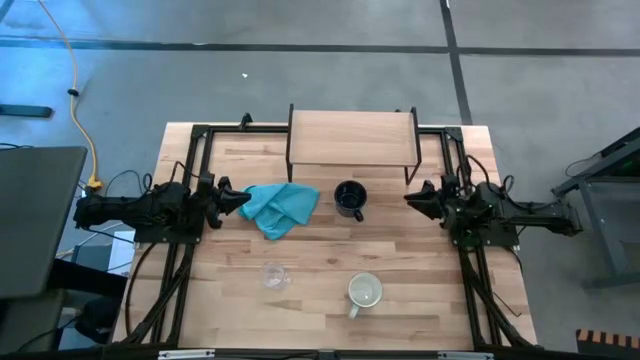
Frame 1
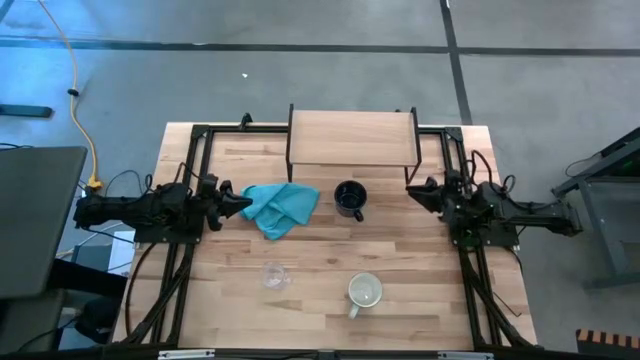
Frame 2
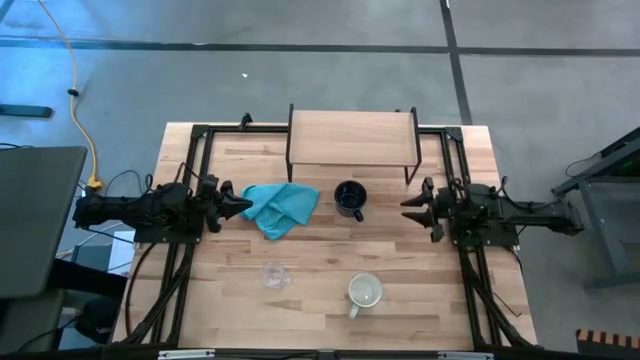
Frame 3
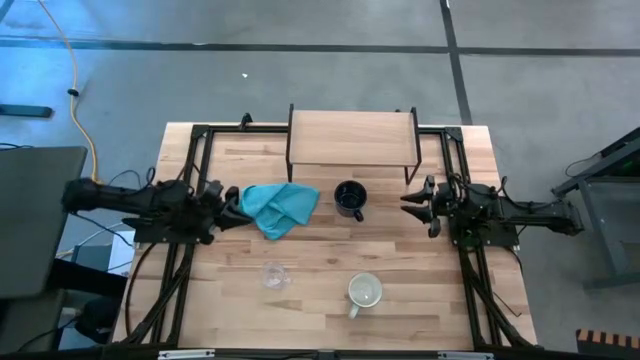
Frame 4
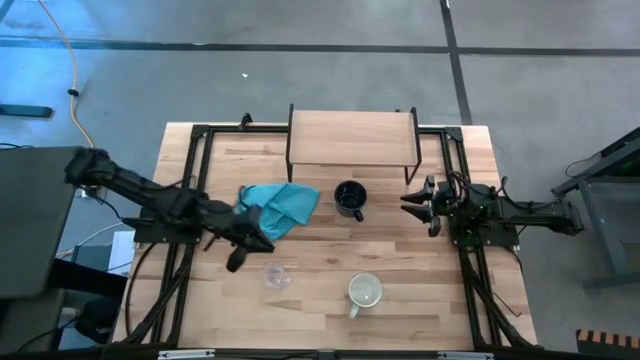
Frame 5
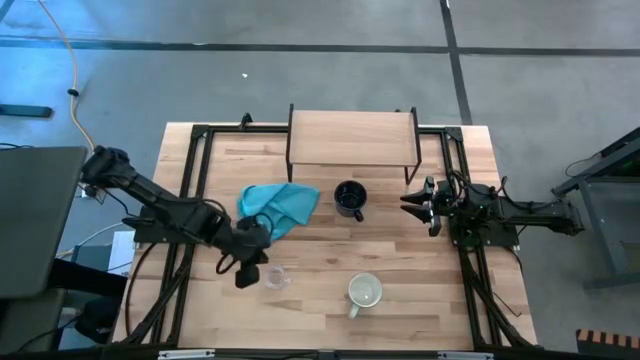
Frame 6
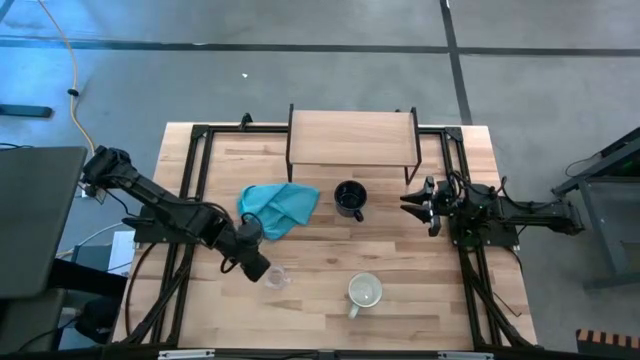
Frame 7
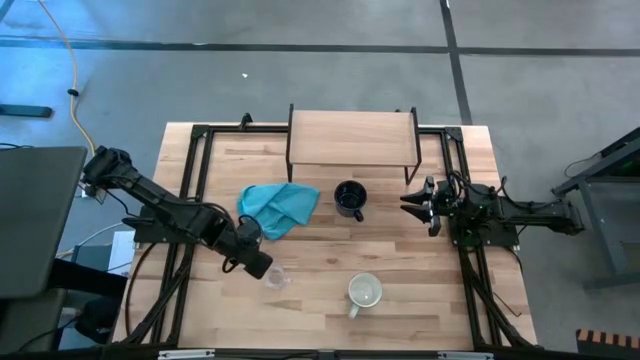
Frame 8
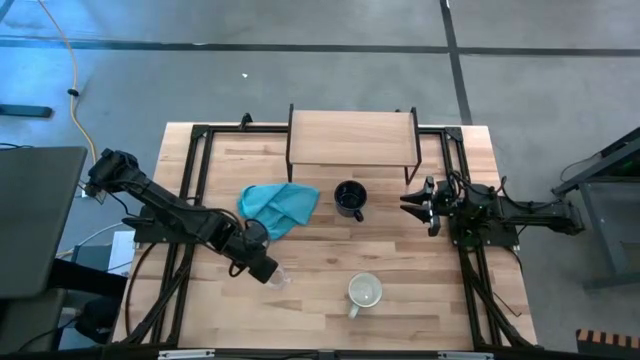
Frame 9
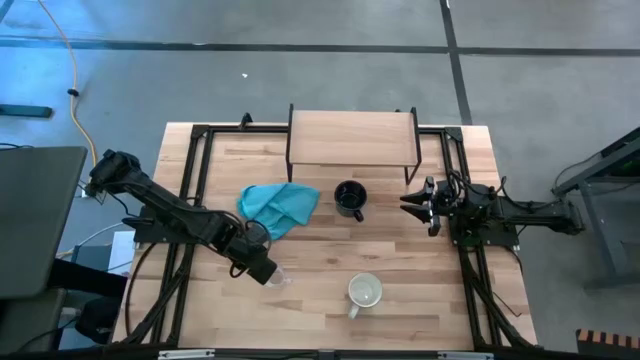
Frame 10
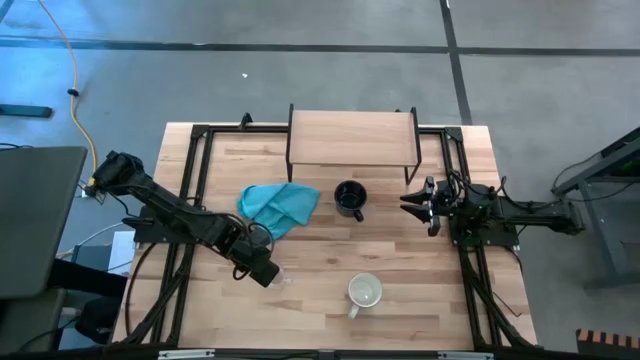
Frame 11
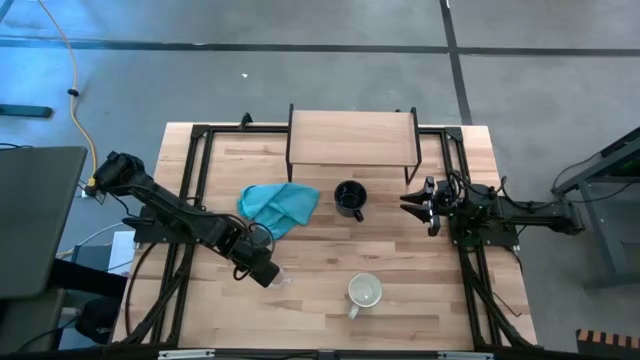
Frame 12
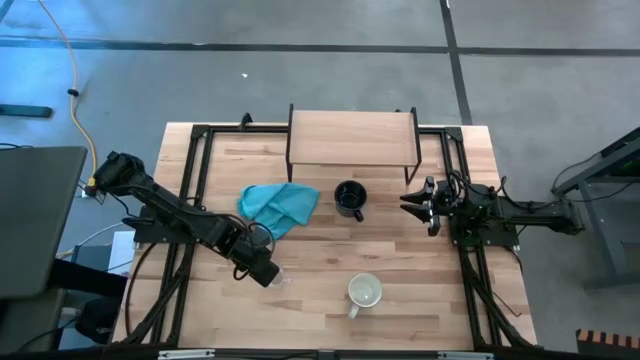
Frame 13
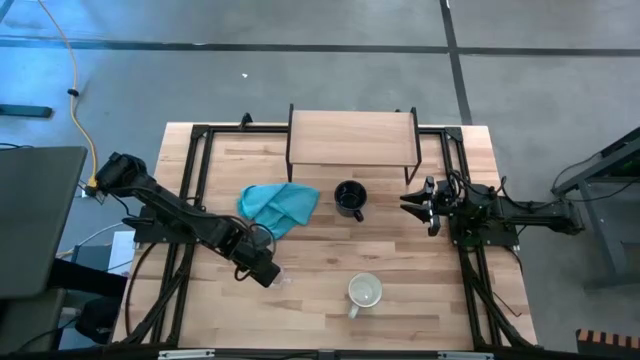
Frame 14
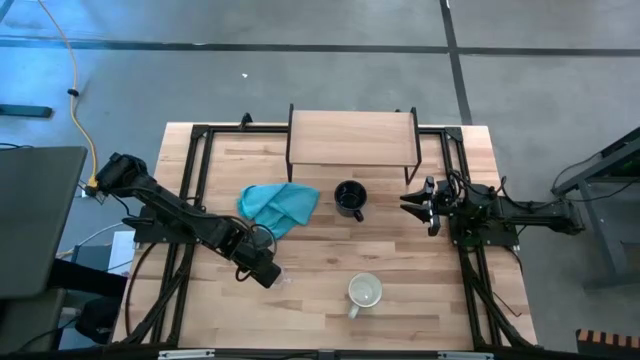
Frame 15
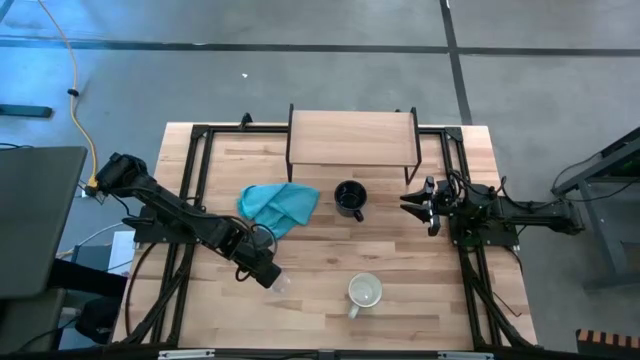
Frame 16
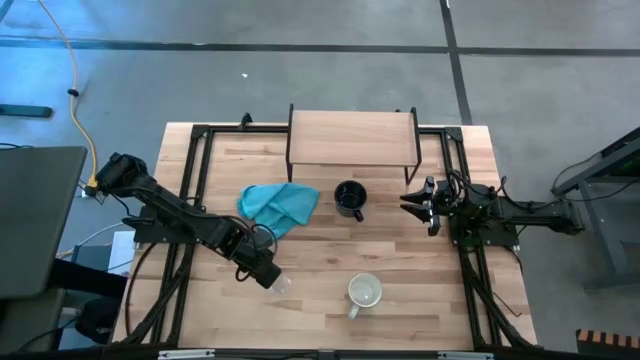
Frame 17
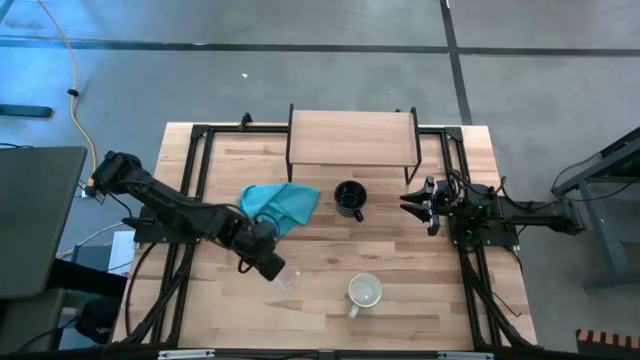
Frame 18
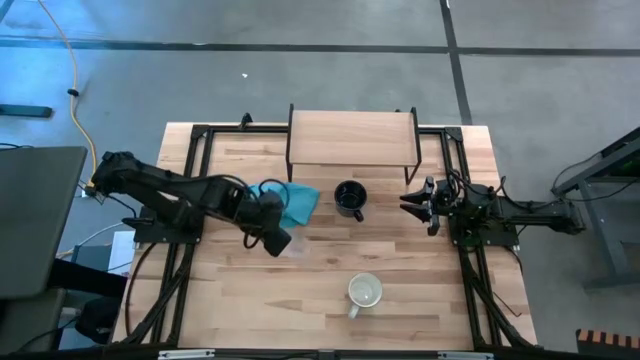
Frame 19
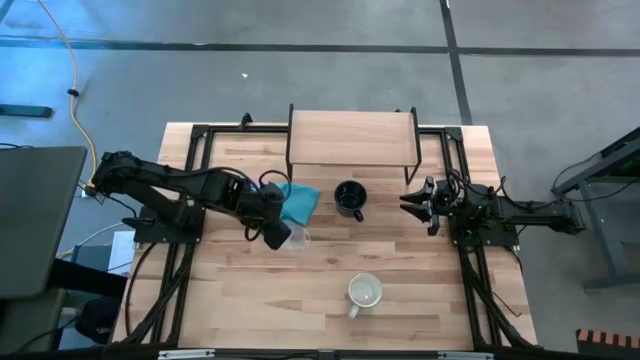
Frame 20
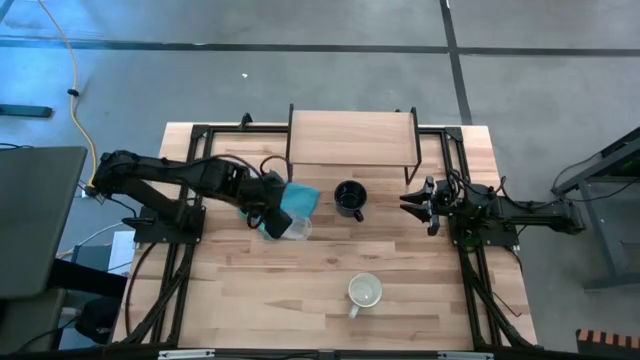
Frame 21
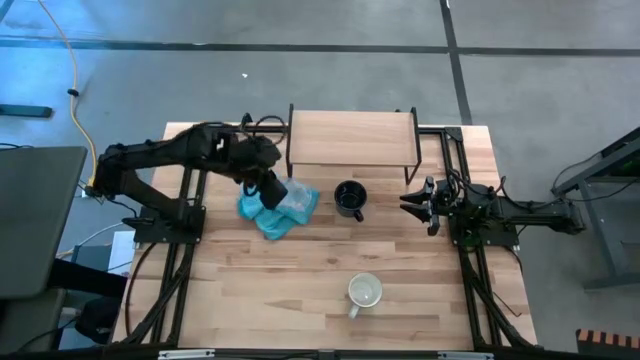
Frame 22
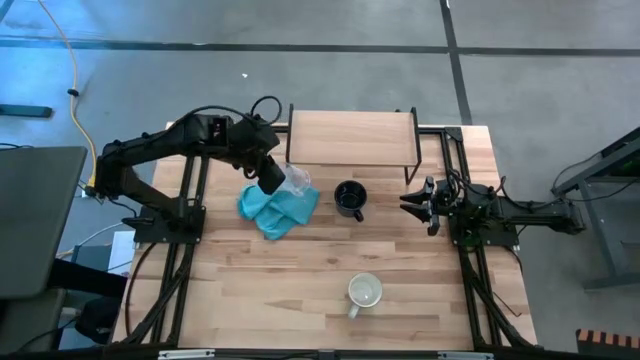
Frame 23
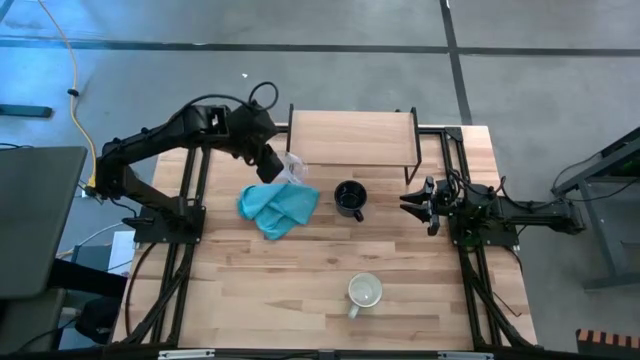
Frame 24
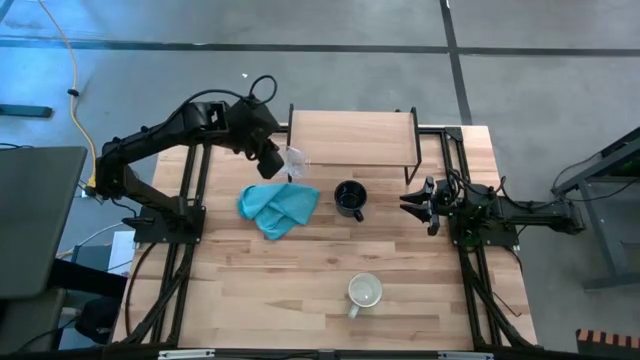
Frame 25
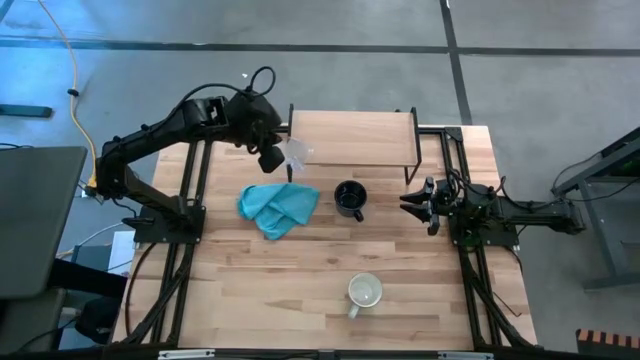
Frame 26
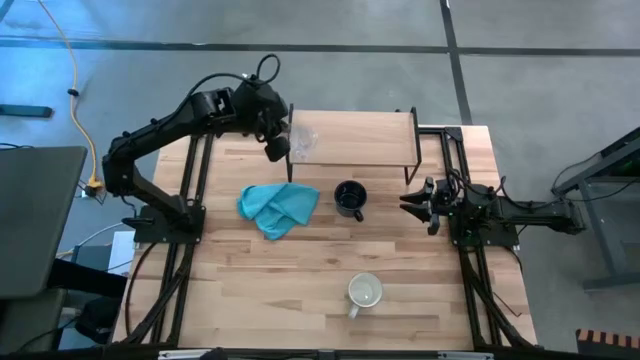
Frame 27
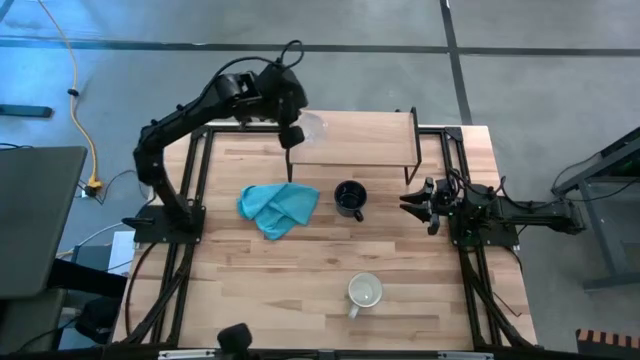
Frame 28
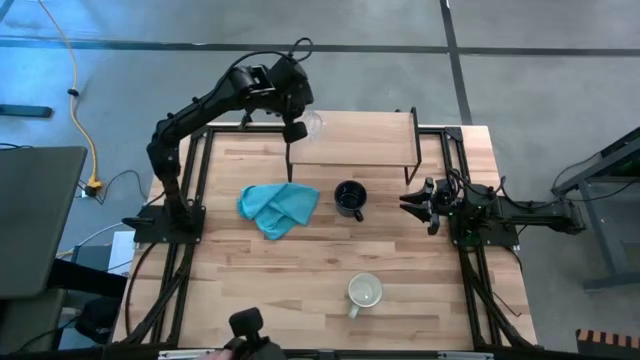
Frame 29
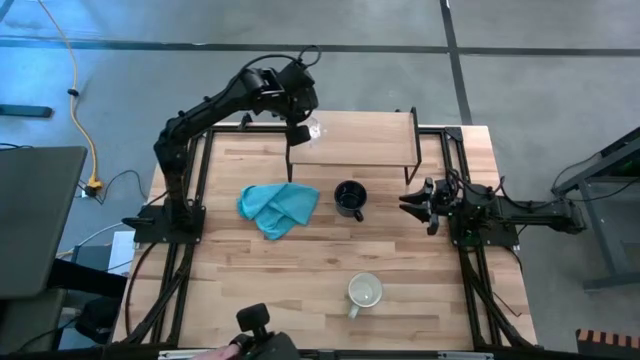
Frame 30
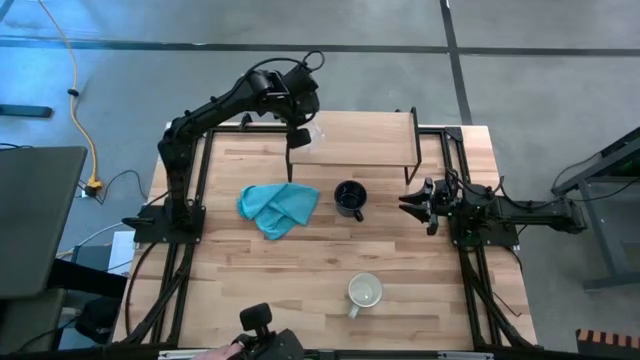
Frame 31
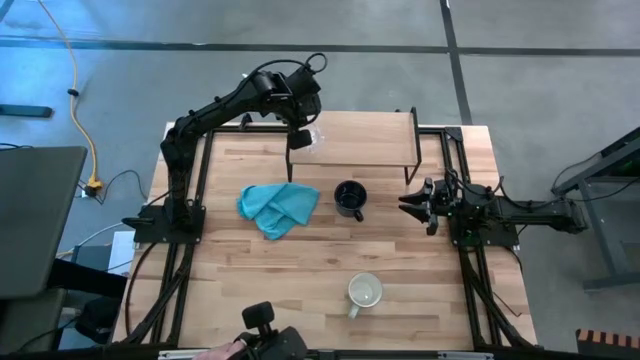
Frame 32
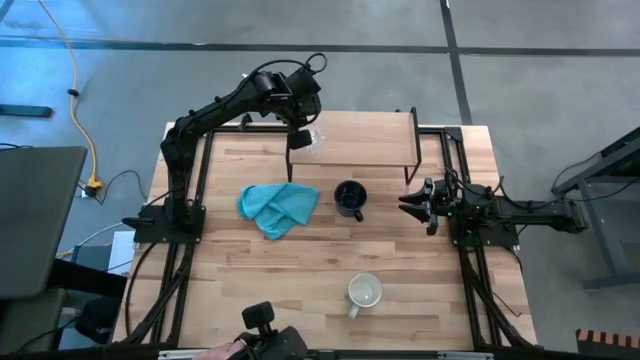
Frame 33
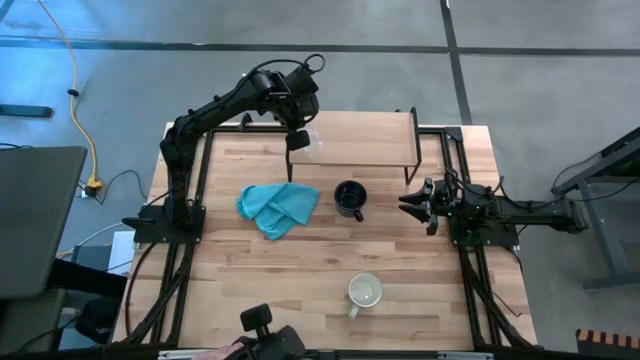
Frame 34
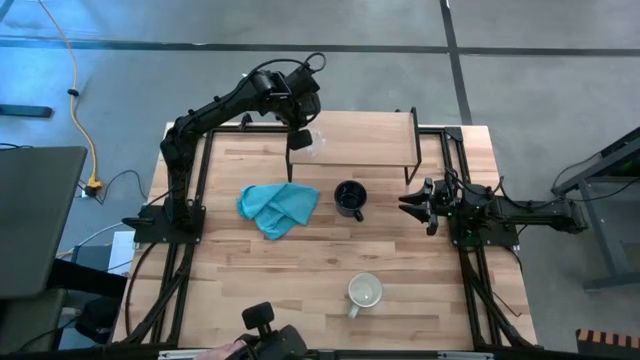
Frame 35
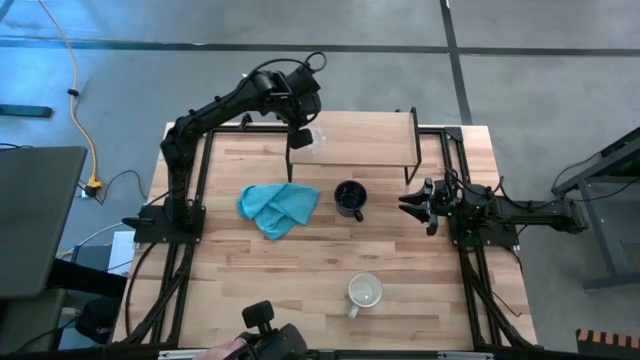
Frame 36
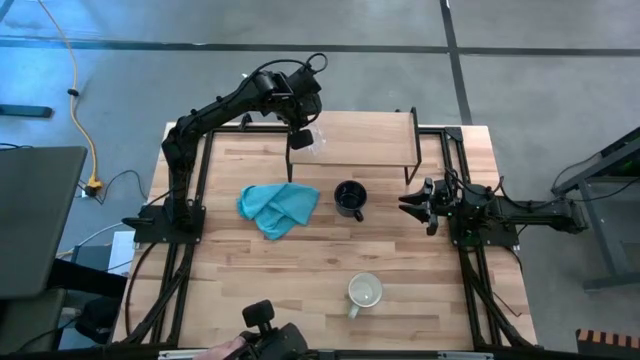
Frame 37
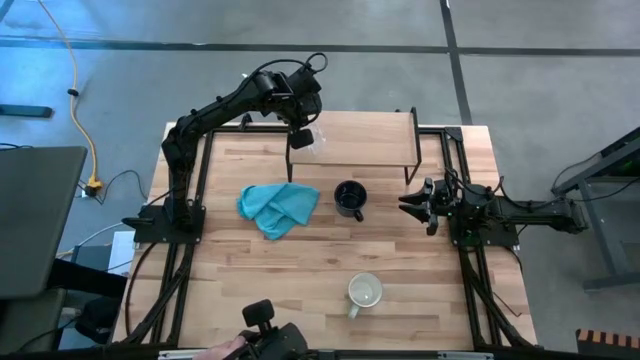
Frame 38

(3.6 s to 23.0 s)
Task: Stack small to large cups/mugs on shelf
Put the transparent mug on the shelf
